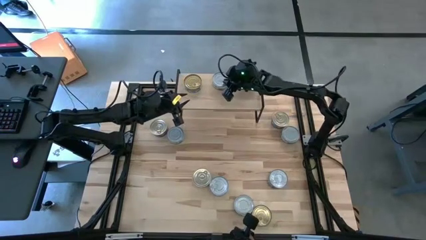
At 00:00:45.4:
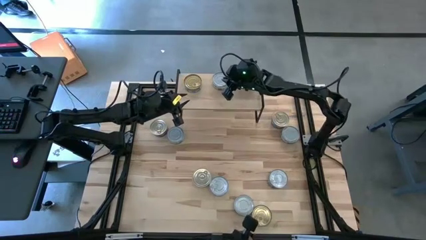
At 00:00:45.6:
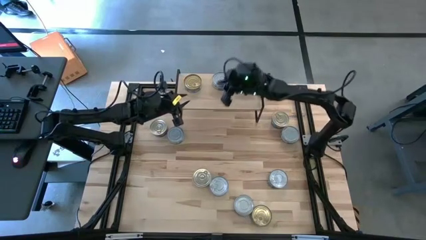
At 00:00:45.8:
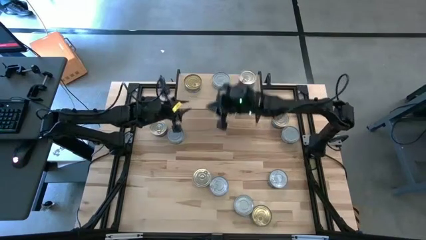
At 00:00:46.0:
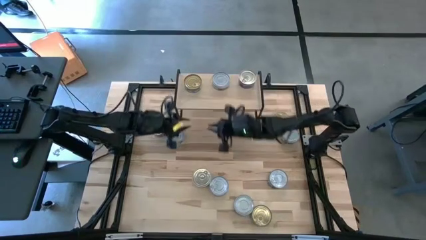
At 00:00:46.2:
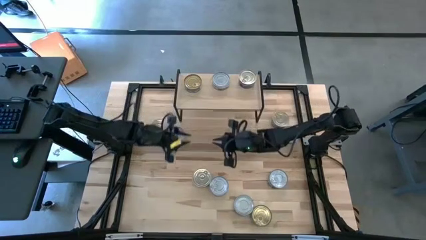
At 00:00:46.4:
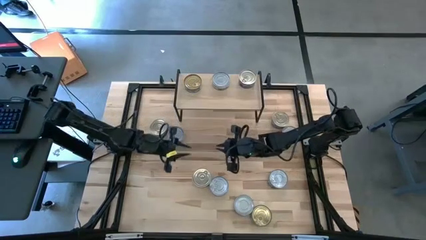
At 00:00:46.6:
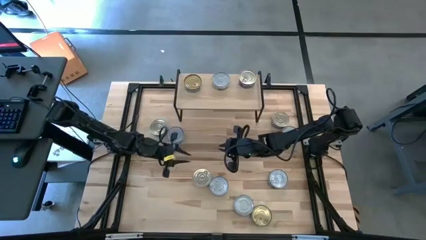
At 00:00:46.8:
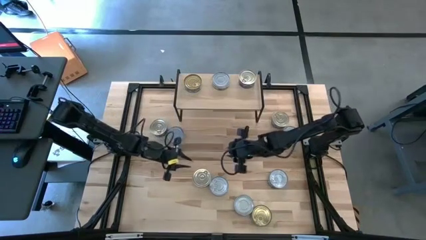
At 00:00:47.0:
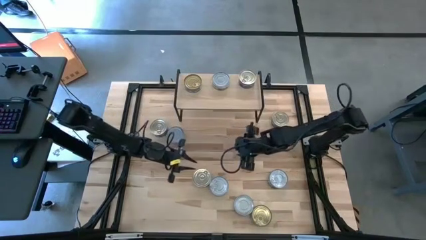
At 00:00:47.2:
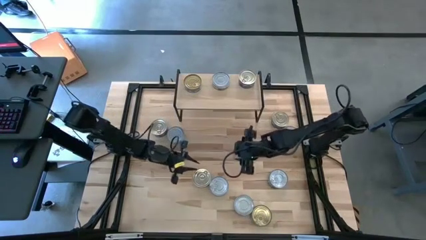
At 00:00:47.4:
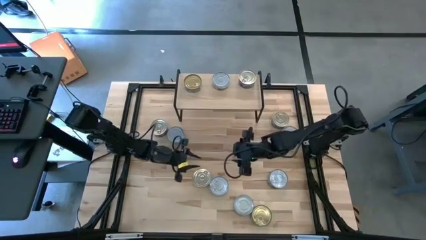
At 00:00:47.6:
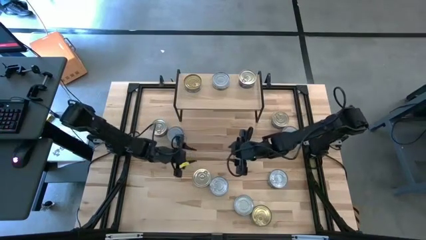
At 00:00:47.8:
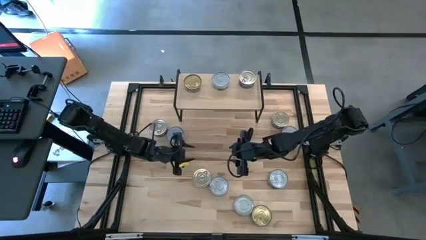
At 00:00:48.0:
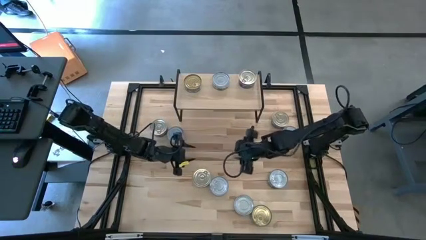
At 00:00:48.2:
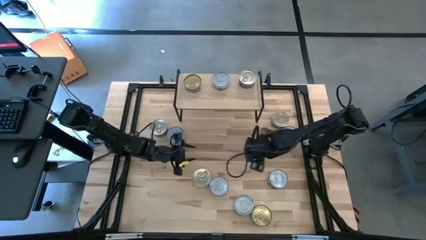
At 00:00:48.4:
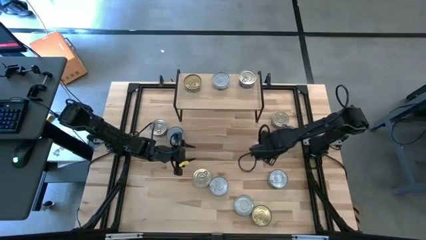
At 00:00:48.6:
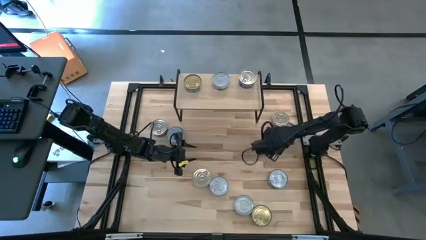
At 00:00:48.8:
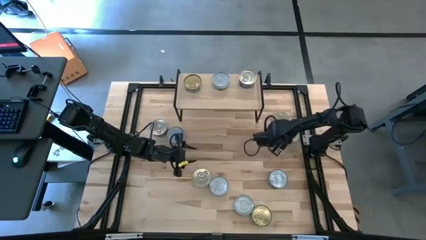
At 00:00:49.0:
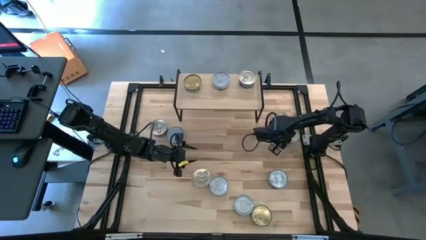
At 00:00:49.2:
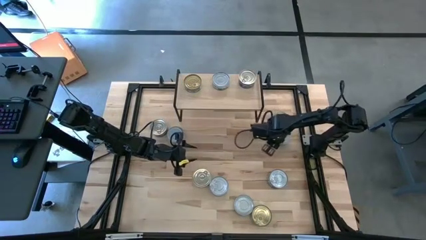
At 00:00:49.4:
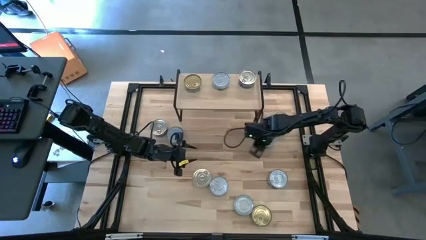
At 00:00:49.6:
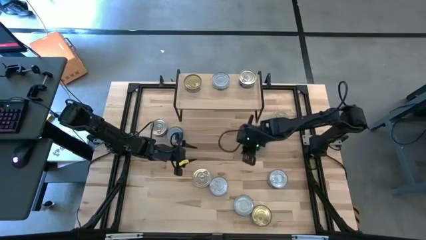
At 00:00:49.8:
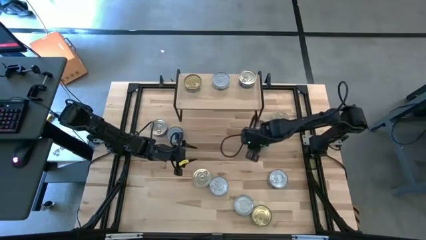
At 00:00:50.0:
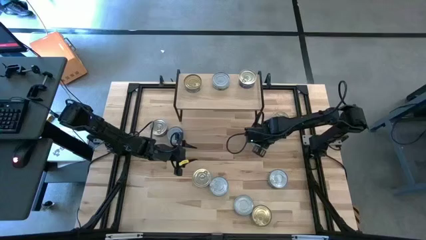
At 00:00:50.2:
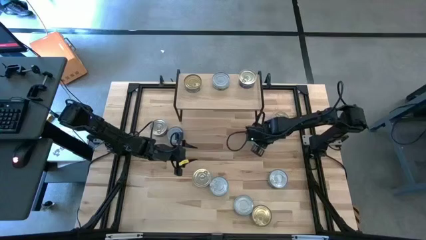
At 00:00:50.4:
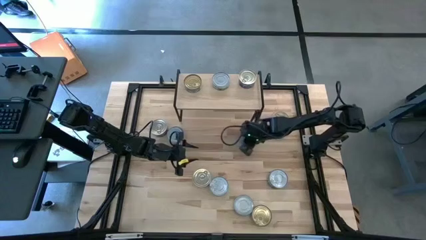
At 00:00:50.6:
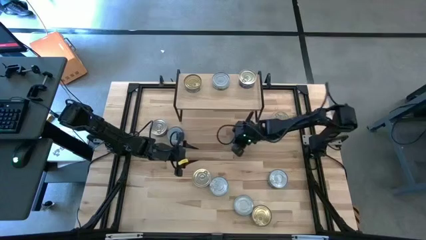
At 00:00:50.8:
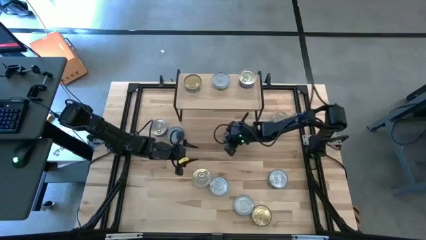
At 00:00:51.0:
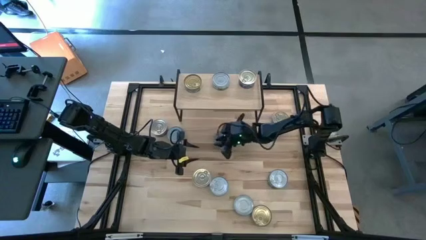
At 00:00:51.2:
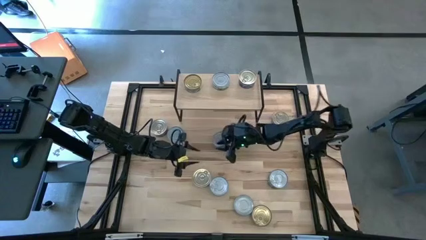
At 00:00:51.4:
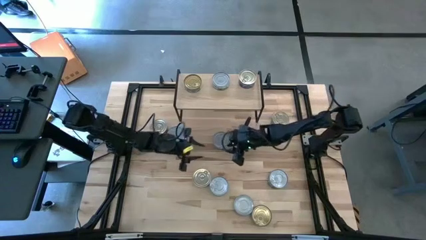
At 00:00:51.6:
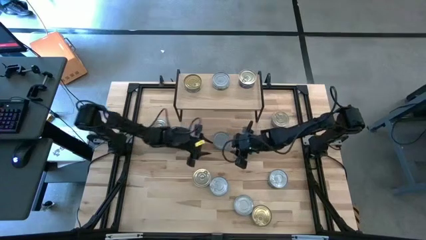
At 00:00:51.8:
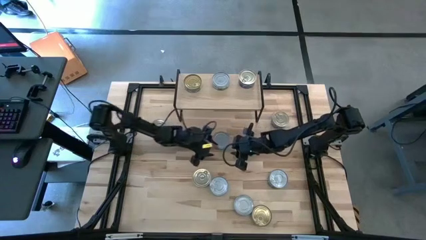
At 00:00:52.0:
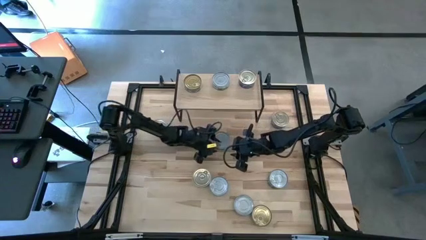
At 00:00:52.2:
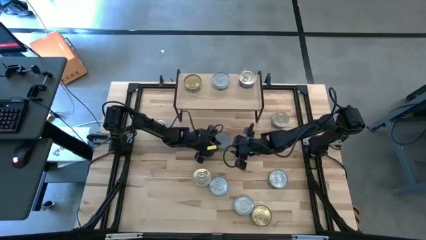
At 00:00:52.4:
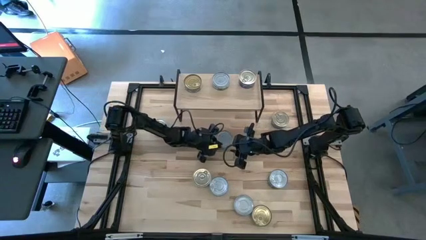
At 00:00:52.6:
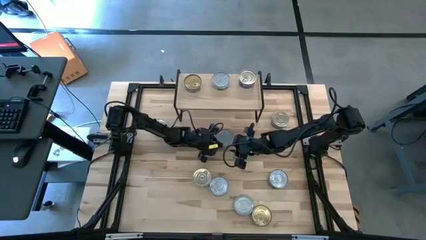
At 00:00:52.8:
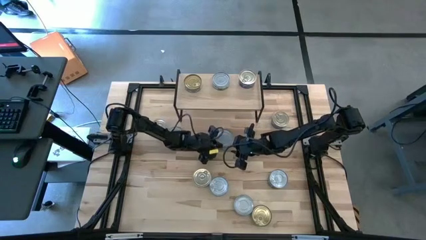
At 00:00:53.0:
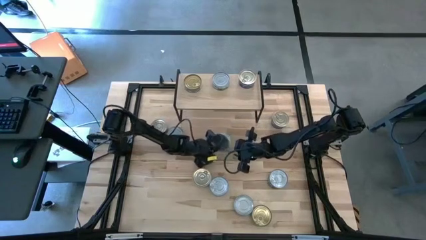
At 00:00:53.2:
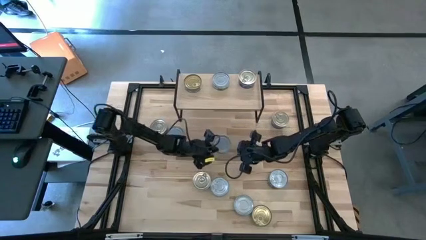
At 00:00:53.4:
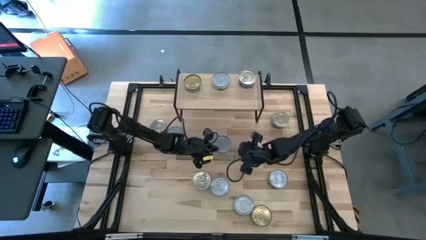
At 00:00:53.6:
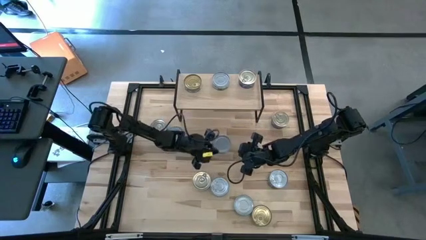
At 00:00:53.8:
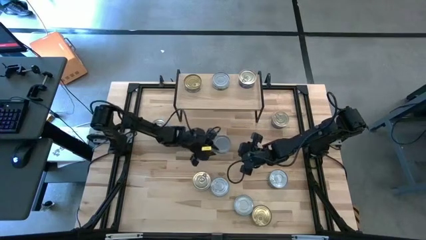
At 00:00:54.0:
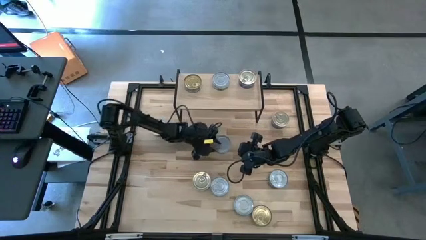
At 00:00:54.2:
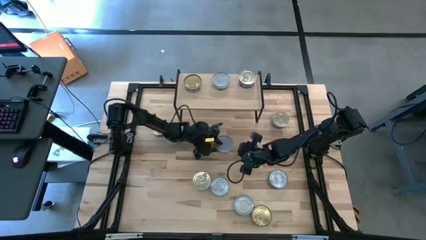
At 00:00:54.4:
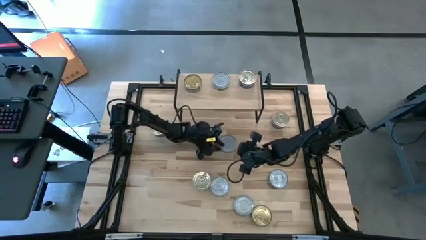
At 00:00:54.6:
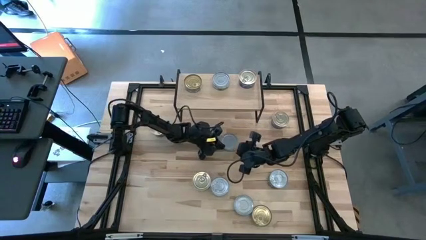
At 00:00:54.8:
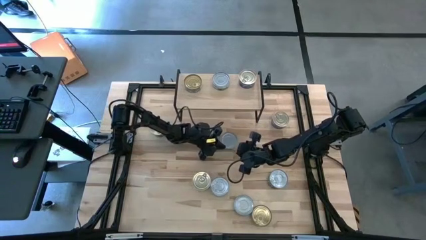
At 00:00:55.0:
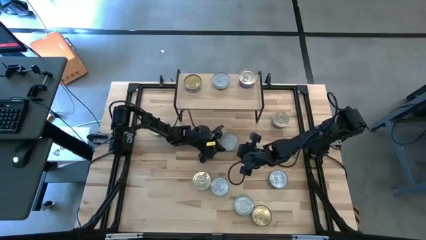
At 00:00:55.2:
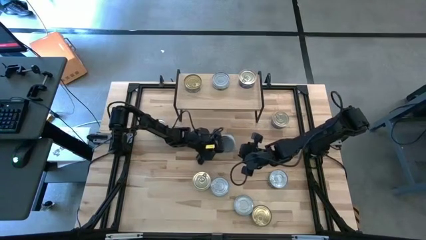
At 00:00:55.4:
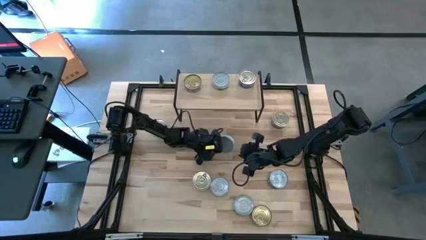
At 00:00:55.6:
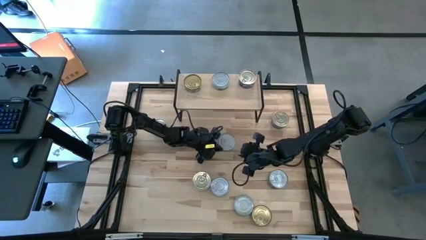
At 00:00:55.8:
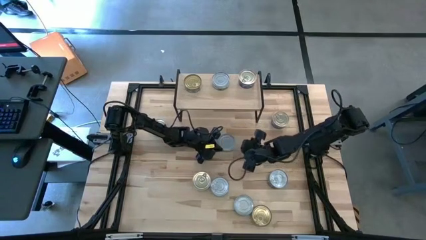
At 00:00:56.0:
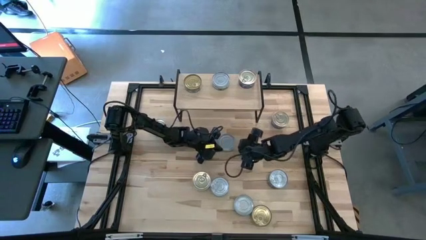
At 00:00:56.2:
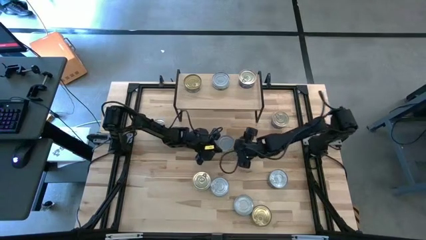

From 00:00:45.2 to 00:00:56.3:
Task: Stack canned seafood by type on shelf
Put the top right light green tuna can on the shelf aligned with the other light green can
